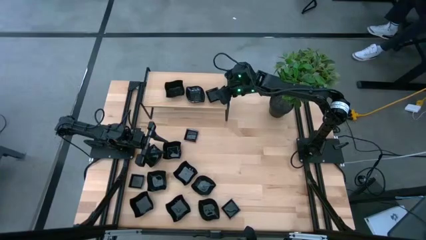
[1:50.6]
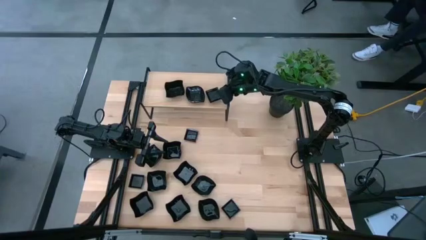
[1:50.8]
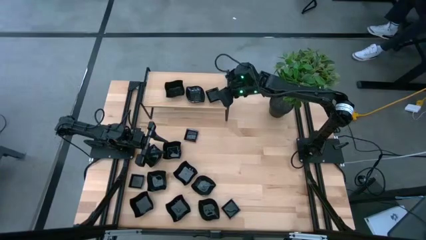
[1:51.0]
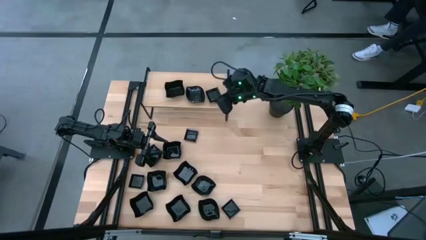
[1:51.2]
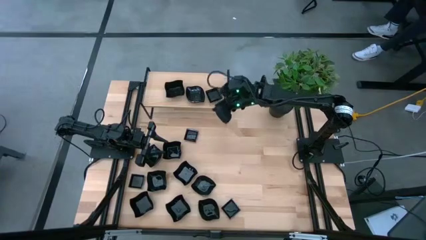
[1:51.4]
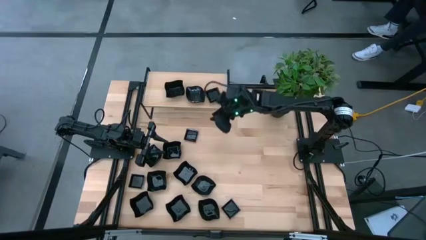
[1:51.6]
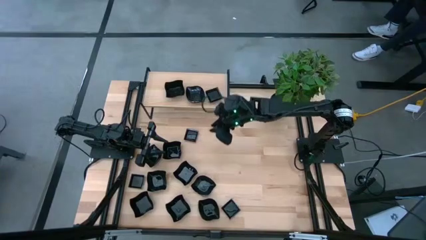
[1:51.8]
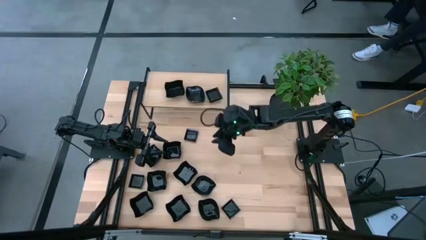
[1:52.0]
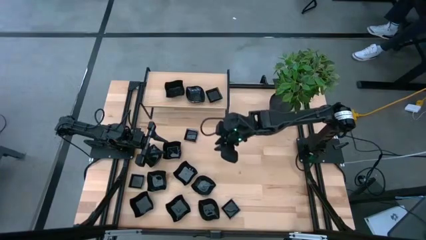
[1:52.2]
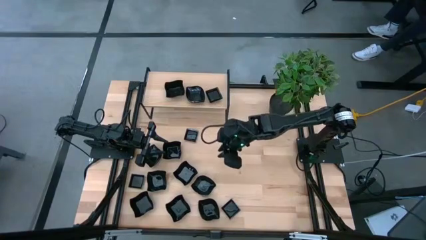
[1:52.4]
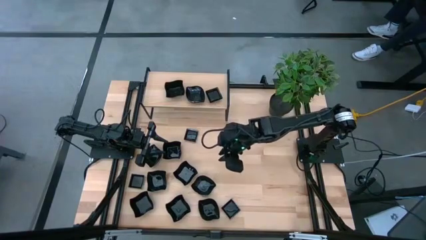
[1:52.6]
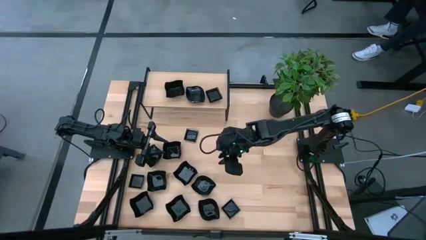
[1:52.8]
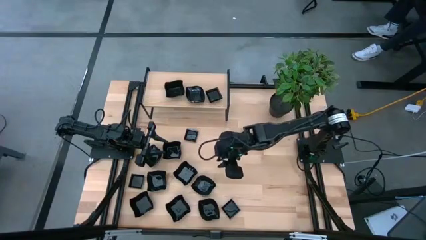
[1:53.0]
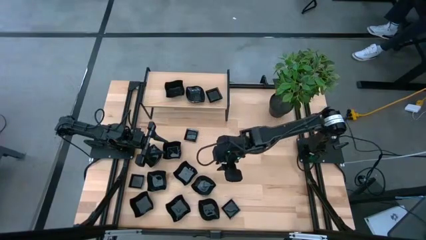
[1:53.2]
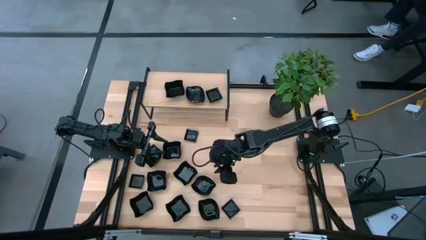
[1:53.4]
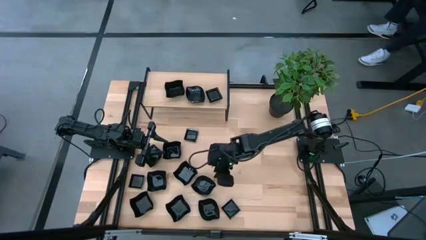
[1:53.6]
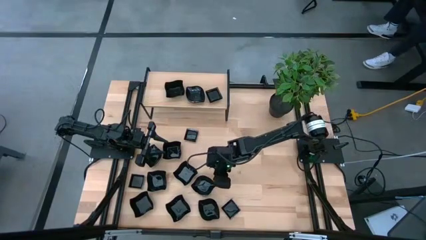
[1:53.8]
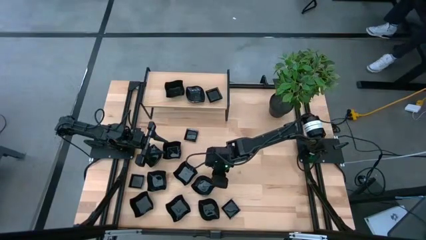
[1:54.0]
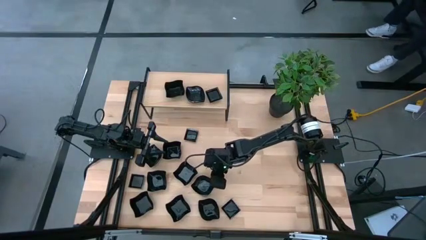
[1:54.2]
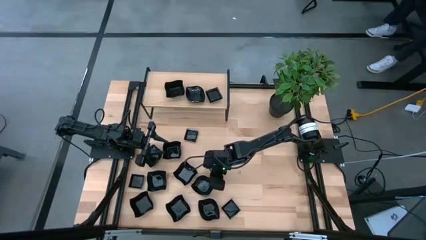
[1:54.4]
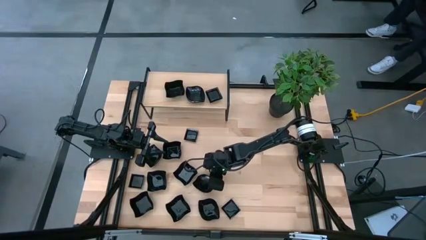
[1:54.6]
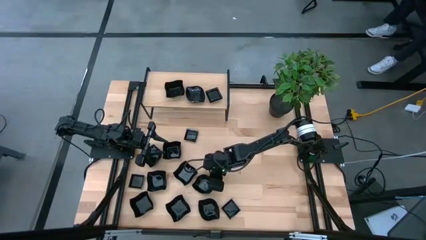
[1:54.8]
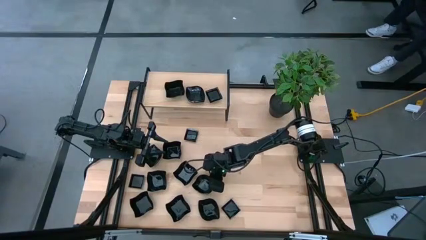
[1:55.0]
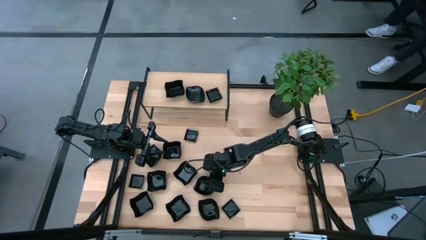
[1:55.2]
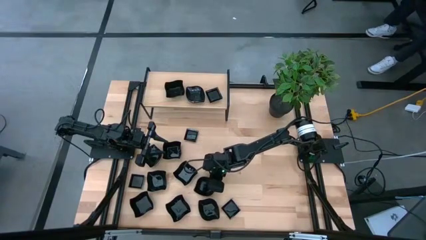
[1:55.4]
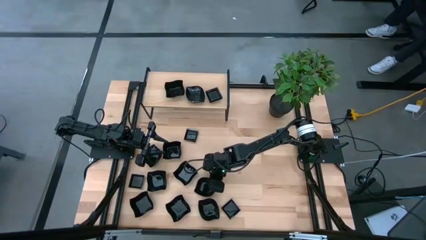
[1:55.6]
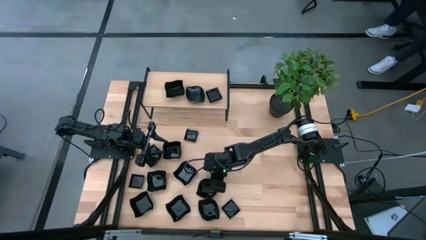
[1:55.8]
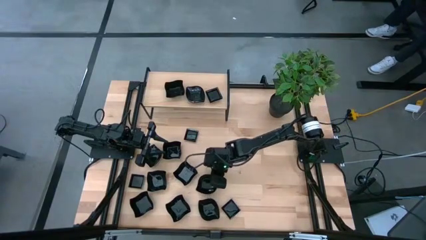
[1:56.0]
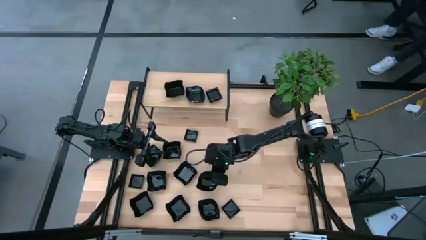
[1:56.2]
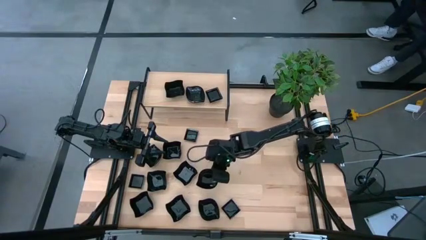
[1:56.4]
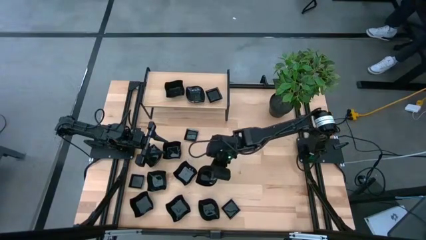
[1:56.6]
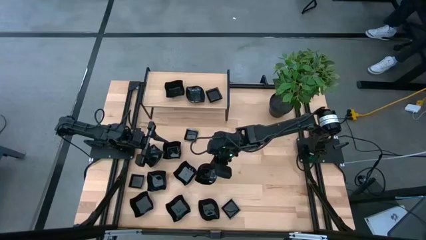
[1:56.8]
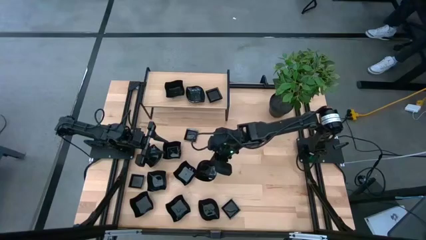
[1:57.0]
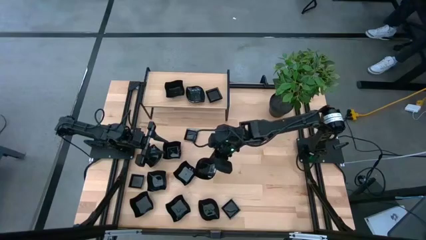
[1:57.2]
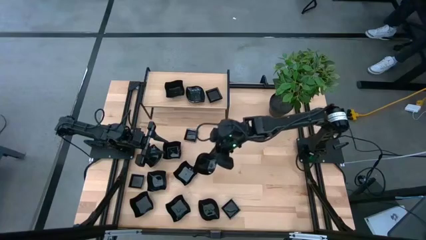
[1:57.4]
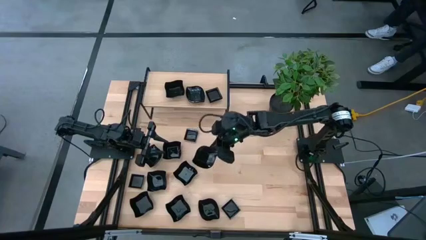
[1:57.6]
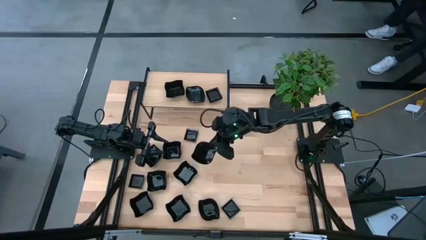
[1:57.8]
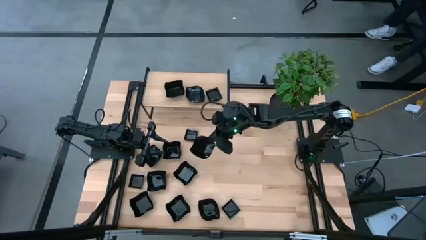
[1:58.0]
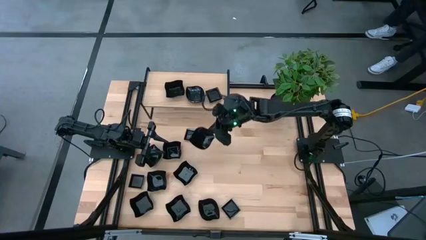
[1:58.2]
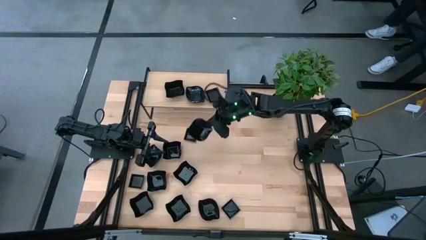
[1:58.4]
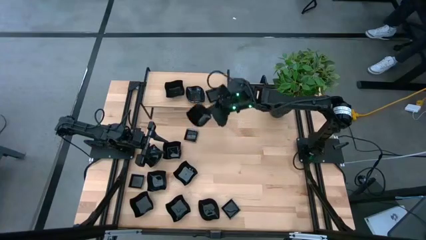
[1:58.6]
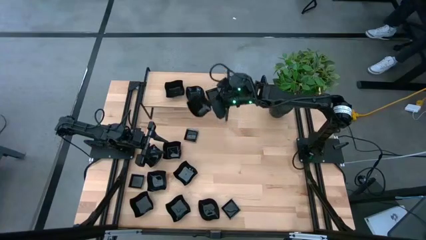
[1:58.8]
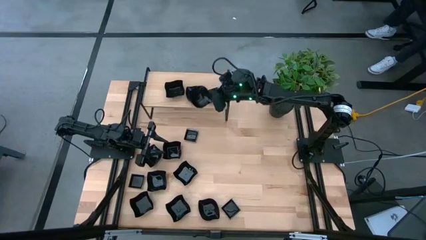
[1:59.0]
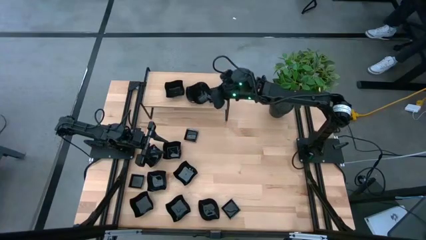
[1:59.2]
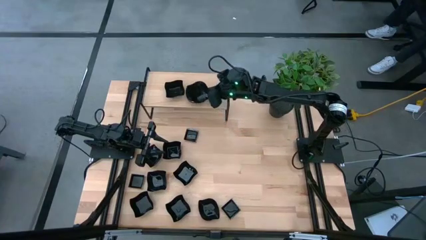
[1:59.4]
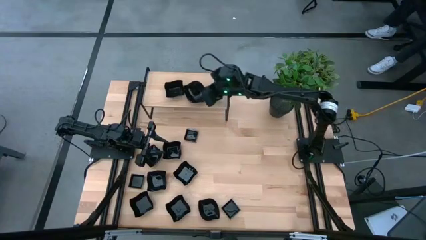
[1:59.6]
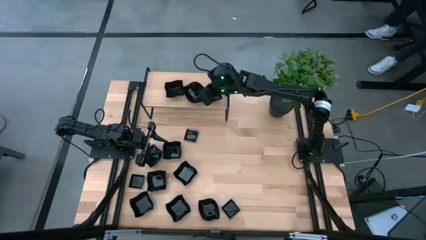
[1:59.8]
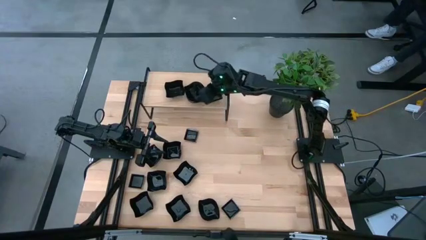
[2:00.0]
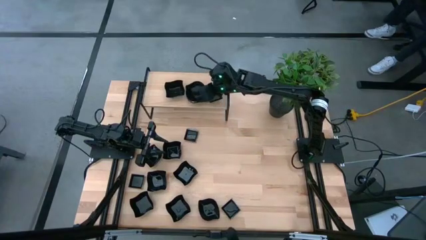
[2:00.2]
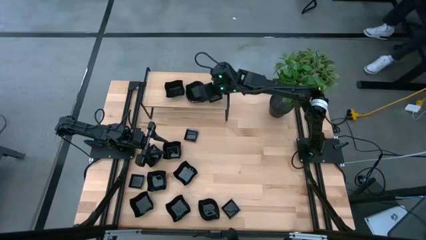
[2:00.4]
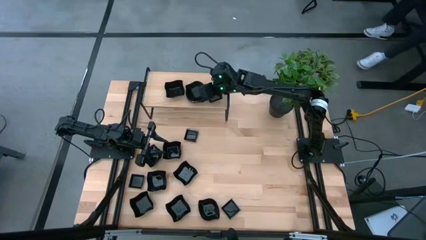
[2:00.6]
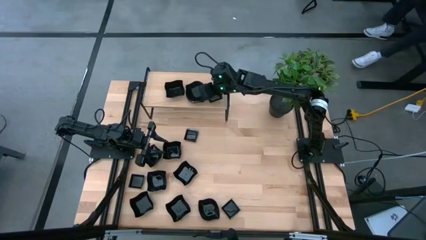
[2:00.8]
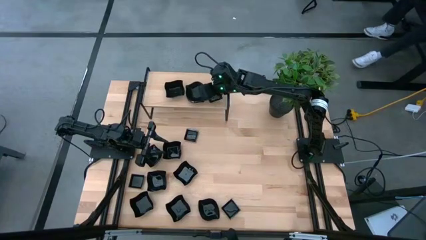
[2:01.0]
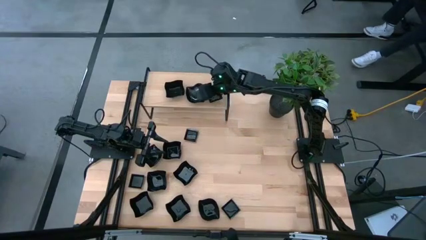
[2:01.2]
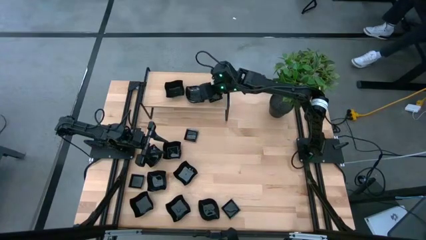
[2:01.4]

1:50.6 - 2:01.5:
Task: Pick & Place Mini shaped plates
Stack the leaf shaped plate on top of the leaf shaped plates on the shelf

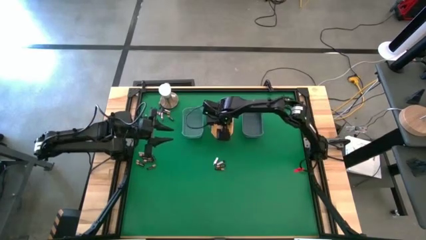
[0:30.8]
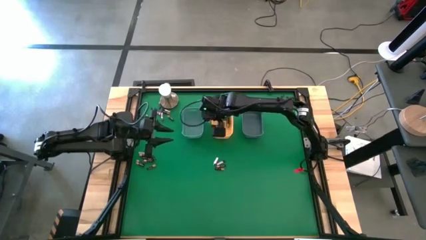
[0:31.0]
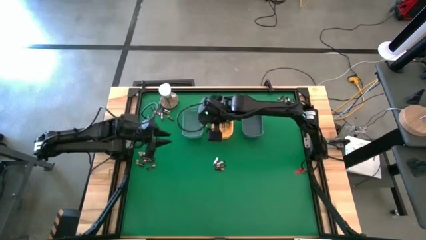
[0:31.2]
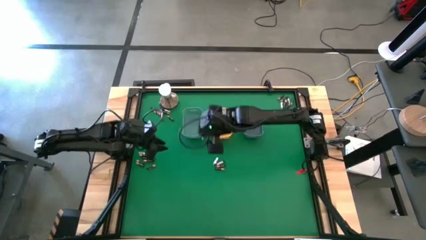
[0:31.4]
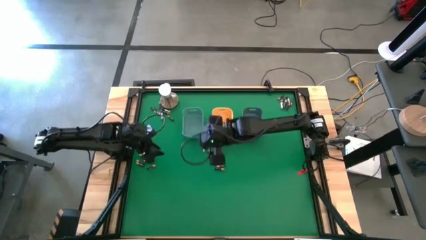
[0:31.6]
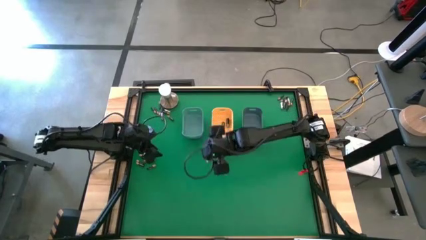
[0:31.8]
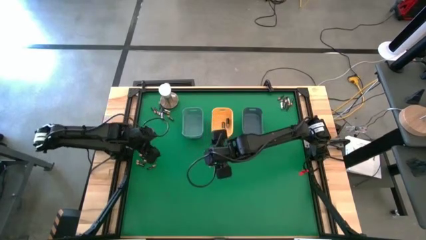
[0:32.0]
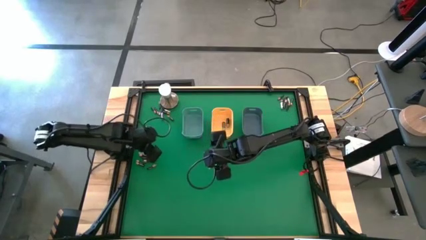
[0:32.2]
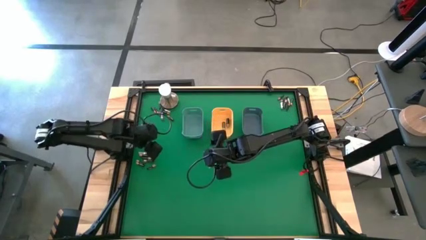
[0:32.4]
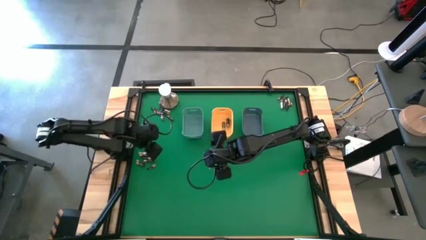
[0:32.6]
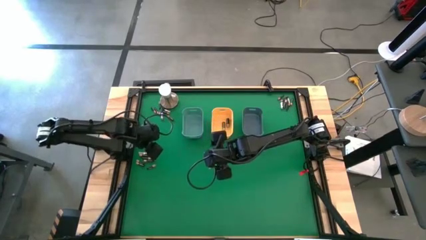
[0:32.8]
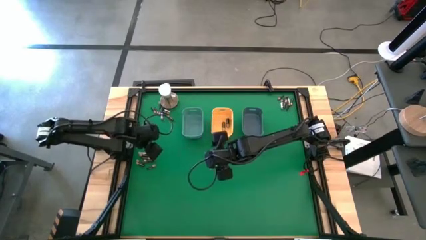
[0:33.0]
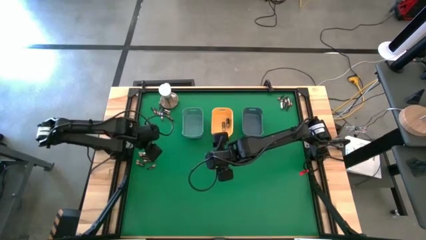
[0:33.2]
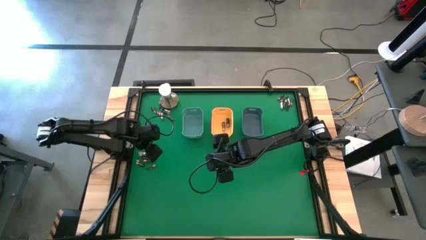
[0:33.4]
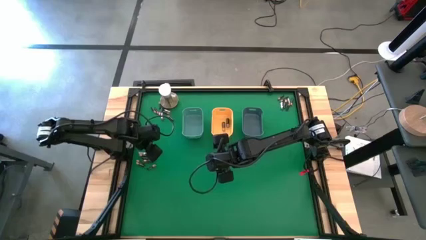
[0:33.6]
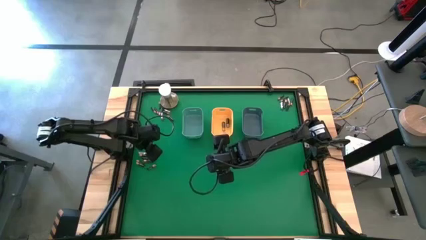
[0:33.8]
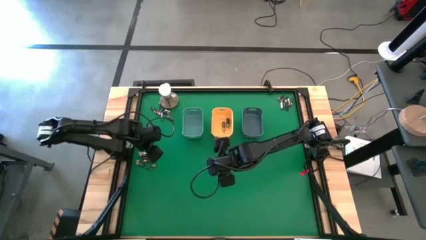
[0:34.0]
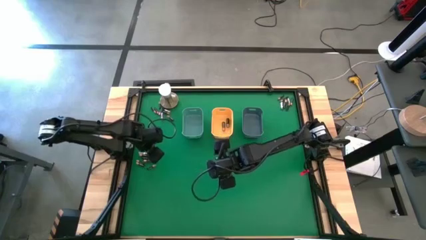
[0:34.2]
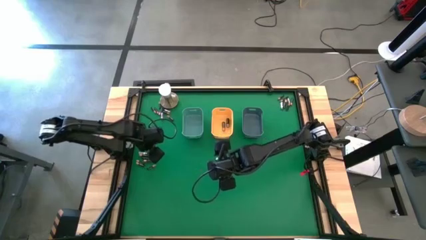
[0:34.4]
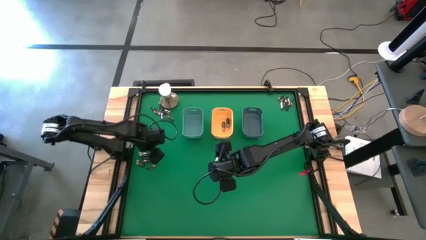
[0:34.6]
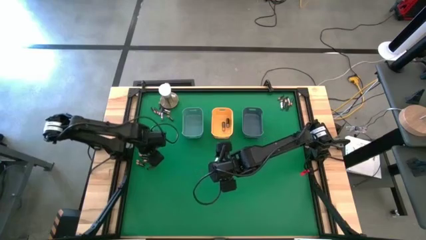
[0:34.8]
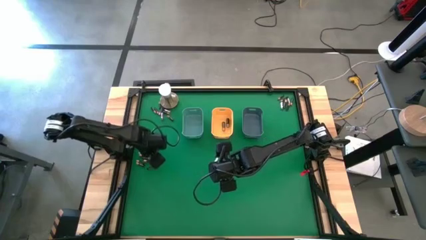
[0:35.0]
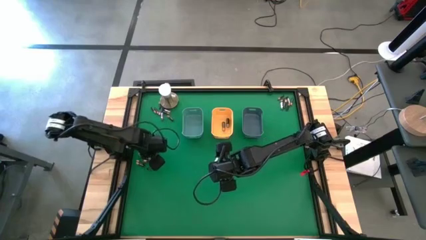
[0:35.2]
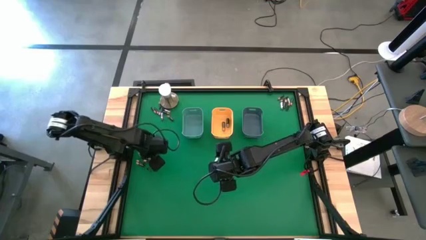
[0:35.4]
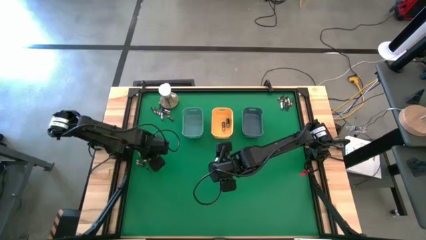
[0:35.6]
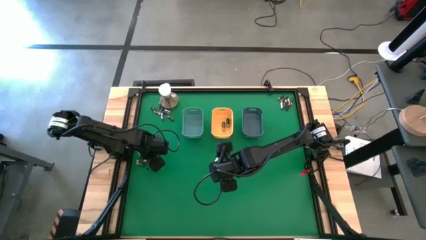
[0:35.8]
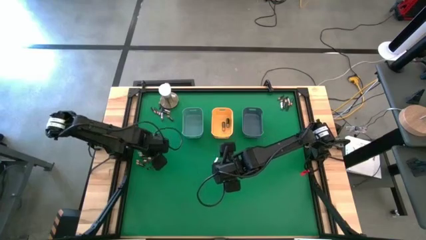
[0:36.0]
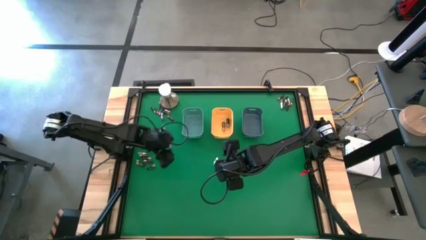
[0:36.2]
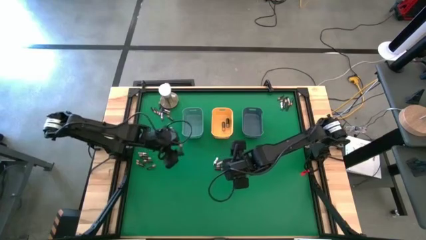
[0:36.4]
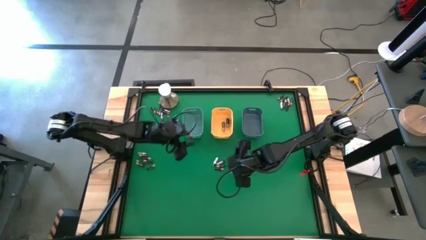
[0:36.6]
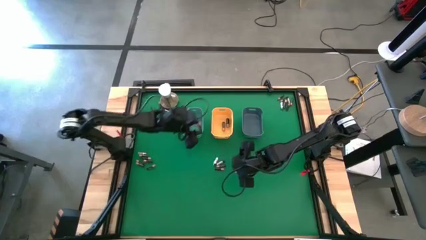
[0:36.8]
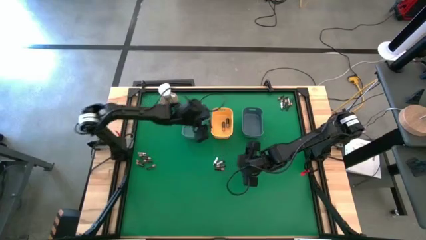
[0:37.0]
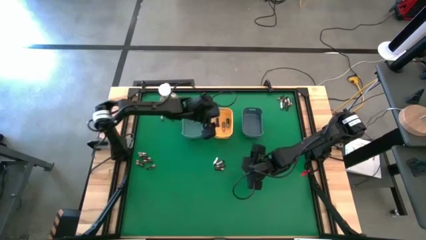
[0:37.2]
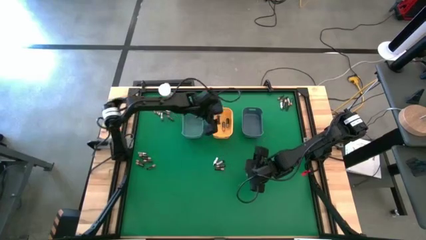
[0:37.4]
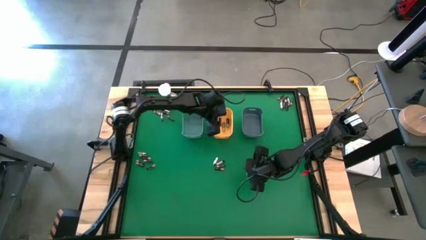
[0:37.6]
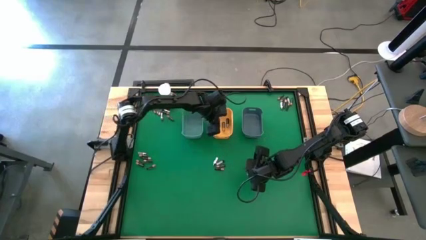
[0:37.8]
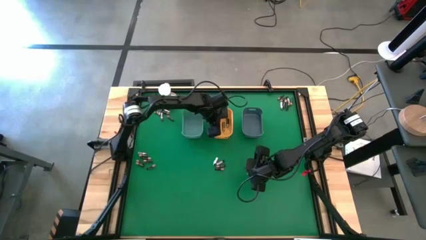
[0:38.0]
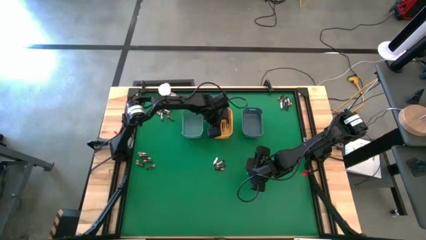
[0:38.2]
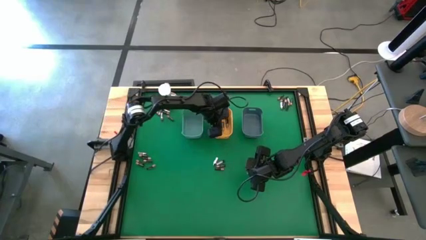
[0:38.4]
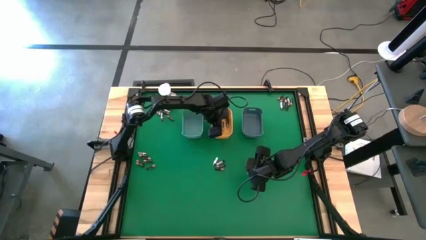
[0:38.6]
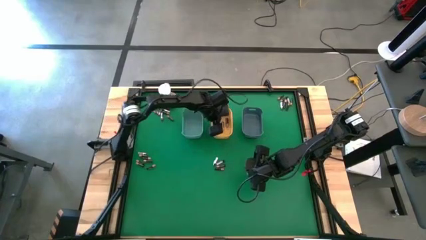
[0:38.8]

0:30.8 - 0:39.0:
Task: Sort batteries
Put the large black battery into the yellow bin
